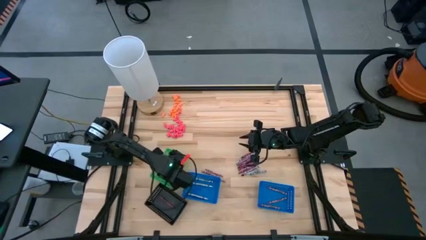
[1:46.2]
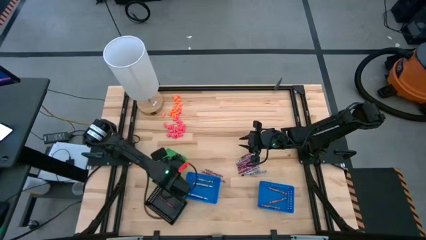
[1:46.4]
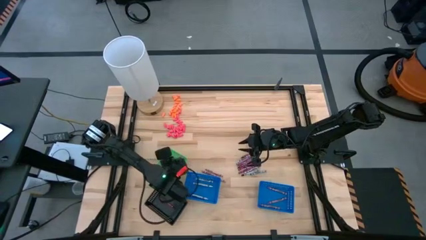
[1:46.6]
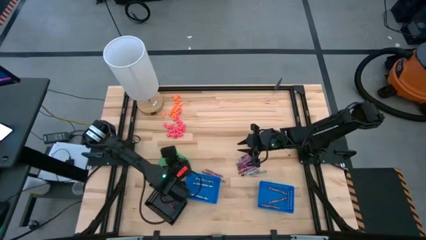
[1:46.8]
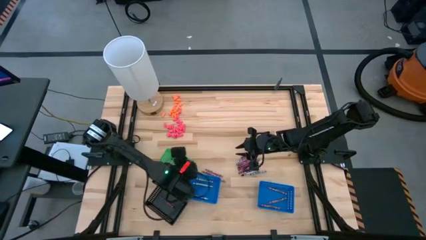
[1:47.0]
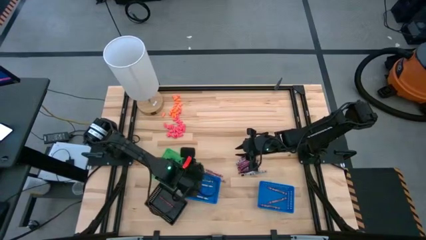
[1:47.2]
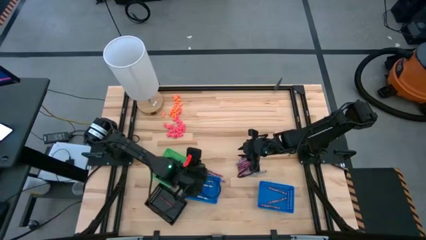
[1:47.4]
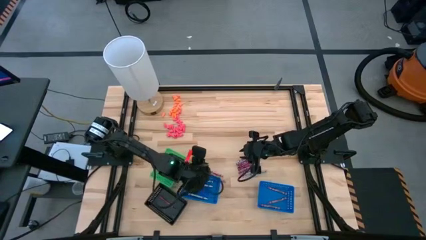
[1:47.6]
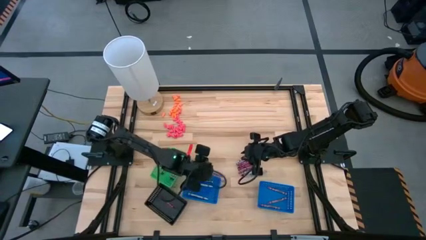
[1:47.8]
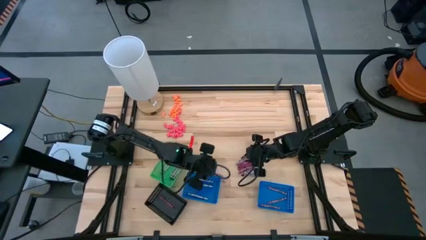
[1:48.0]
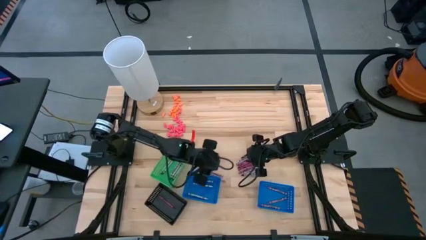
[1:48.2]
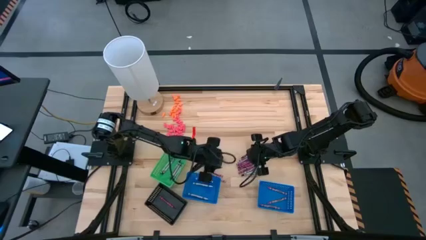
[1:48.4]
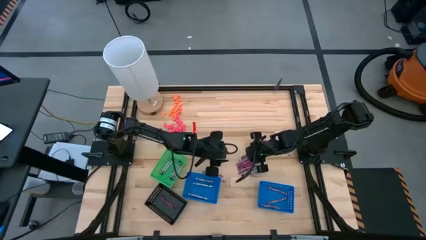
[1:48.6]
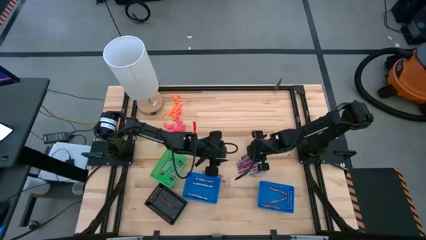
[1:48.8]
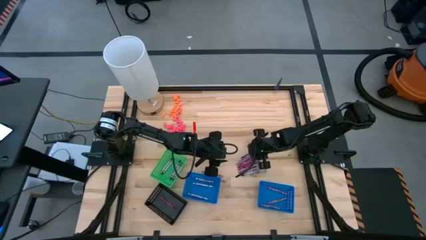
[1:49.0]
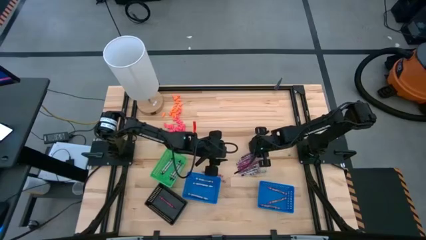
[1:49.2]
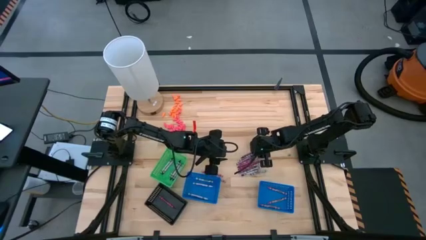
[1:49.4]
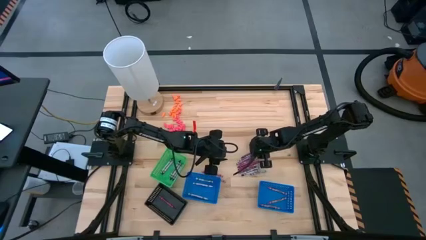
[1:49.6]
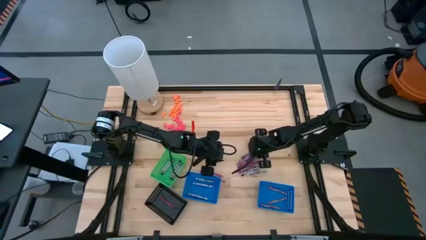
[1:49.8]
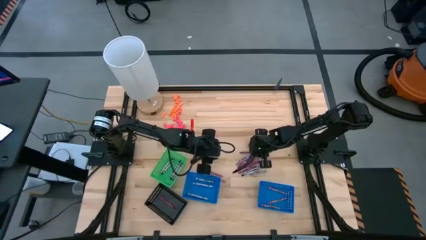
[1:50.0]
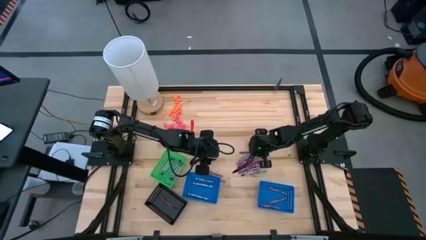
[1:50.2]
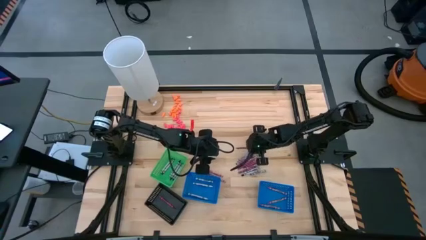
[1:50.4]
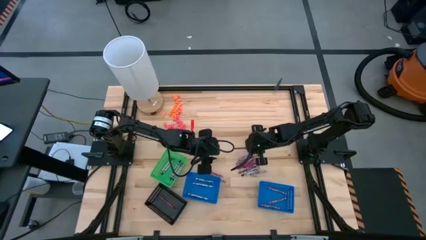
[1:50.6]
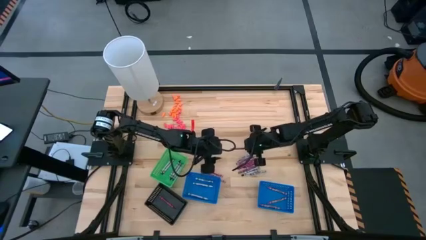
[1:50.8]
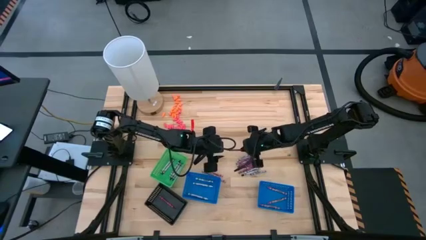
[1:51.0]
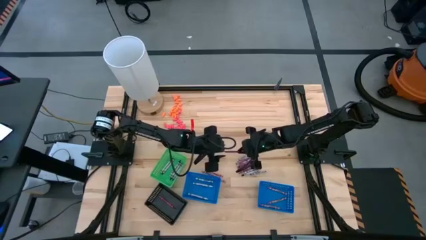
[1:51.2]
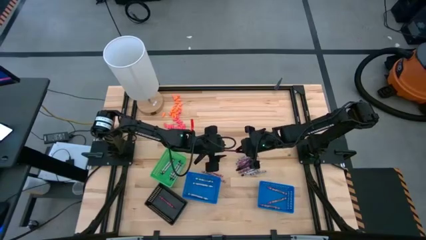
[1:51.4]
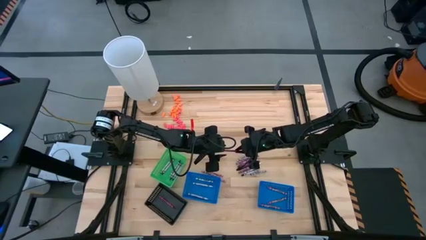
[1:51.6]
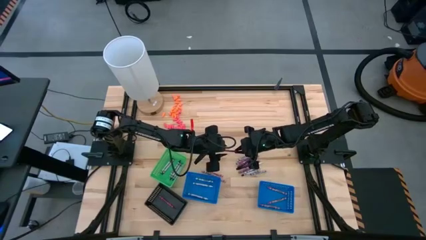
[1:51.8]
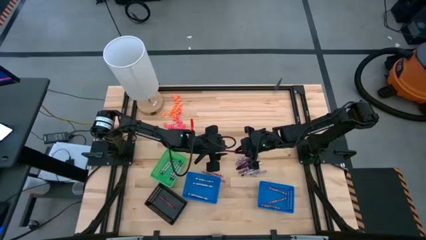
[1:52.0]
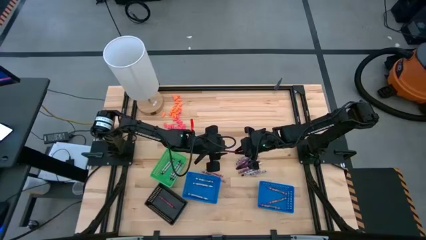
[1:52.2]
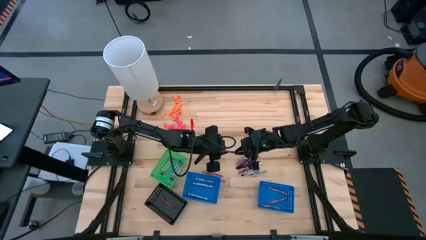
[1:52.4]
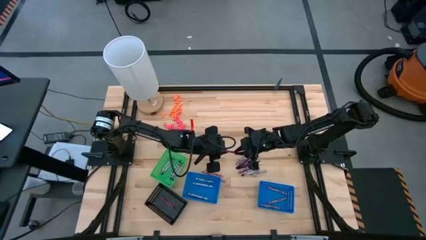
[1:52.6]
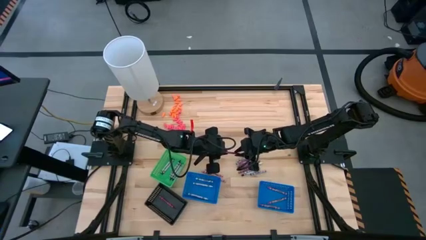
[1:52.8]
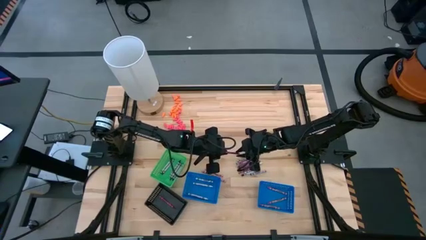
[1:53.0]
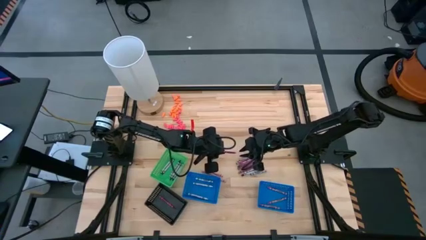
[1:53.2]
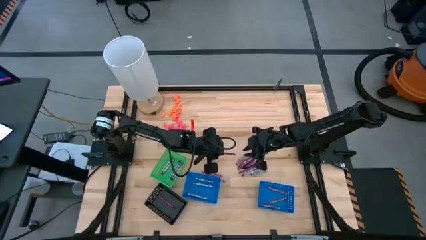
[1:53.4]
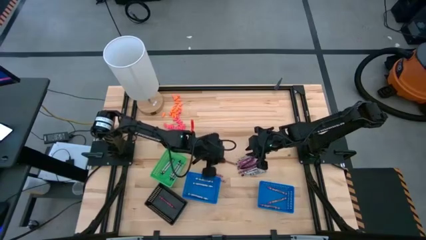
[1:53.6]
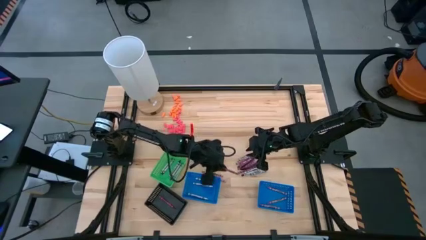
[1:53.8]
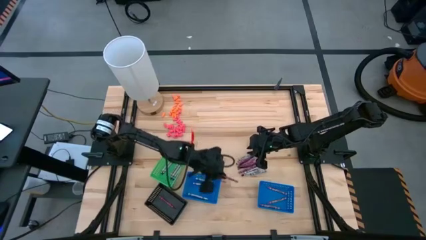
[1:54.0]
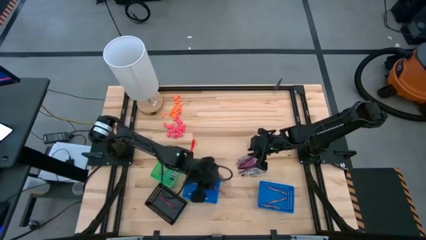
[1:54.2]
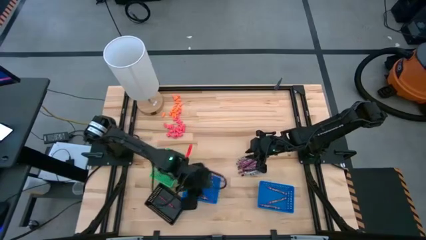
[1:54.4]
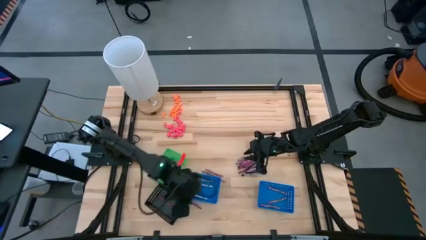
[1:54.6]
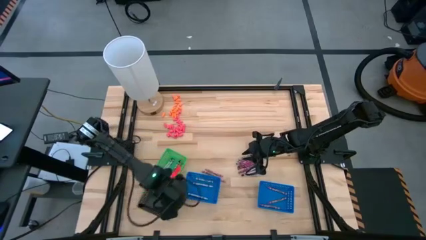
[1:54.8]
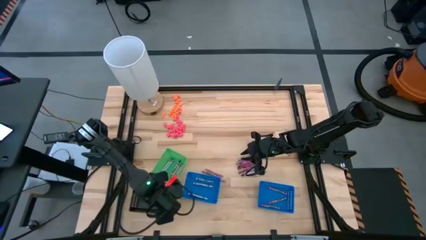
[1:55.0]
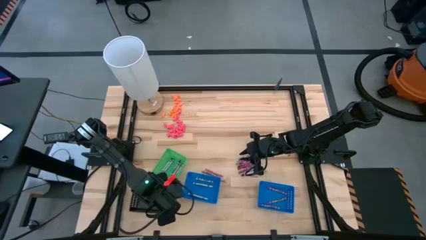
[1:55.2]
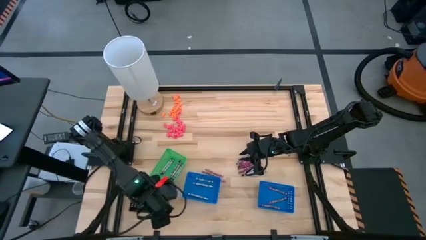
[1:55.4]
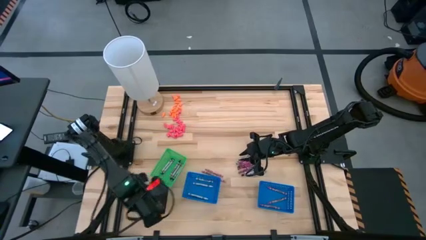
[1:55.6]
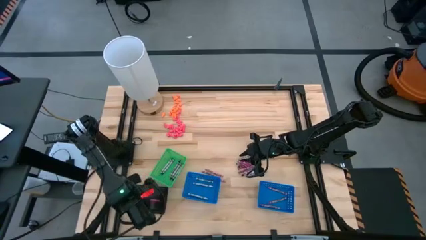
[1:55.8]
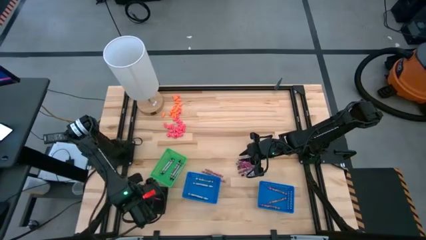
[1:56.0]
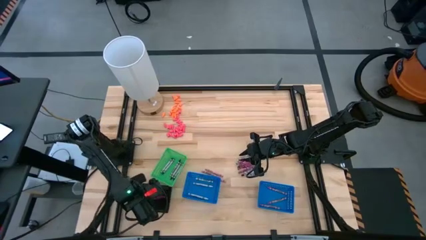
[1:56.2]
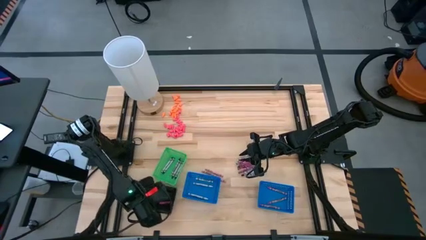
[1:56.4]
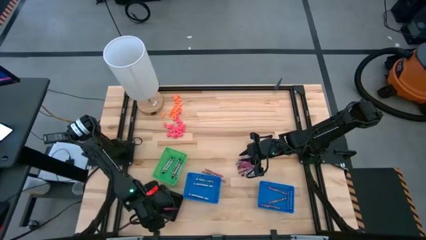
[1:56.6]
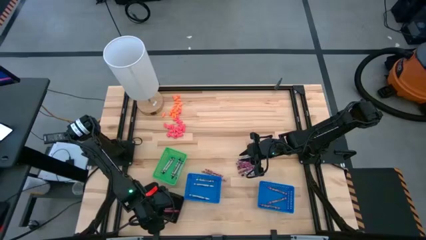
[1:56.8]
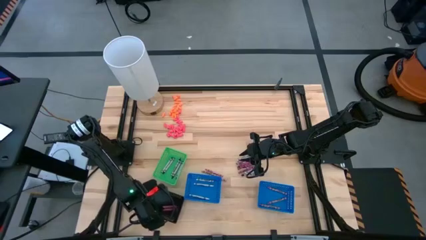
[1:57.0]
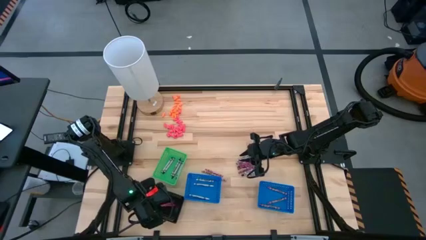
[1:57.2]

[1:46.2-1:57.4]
Task: Sort crayons
Put the red crayon into the black basket

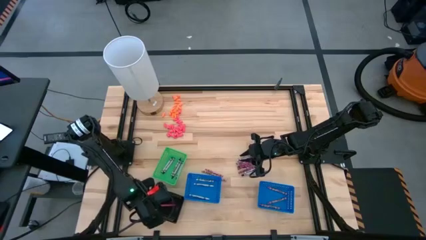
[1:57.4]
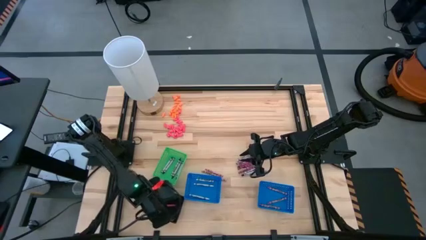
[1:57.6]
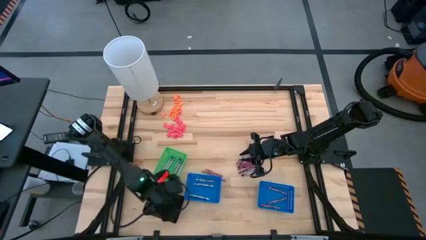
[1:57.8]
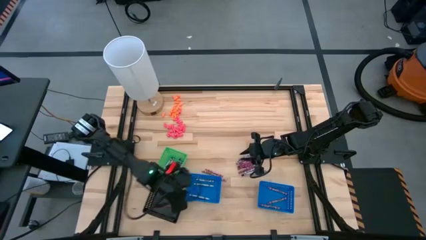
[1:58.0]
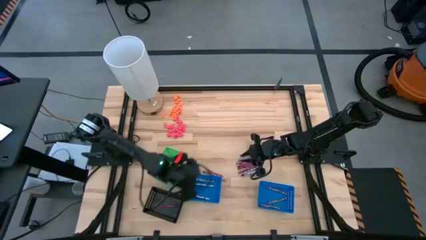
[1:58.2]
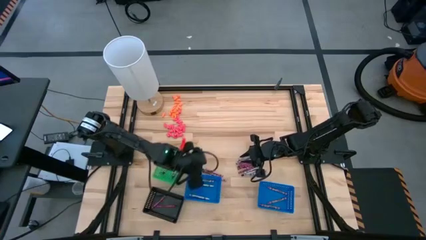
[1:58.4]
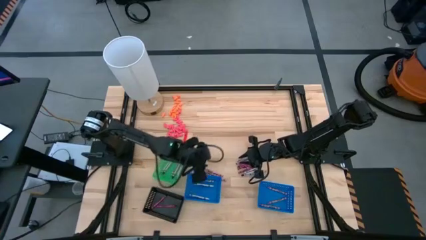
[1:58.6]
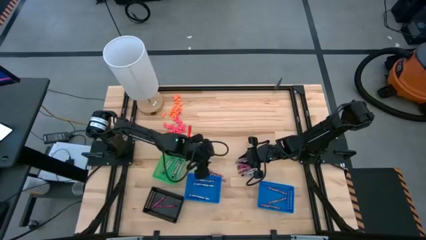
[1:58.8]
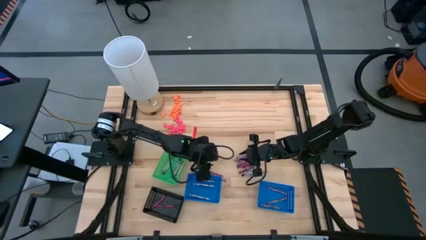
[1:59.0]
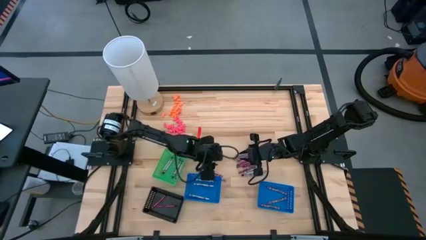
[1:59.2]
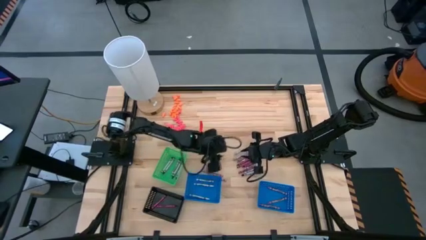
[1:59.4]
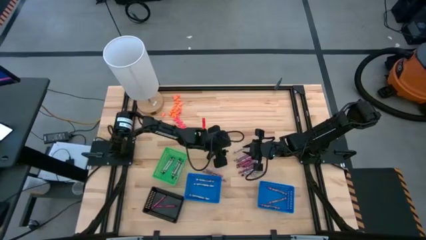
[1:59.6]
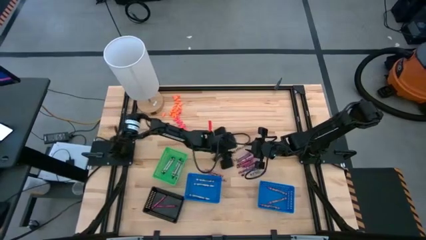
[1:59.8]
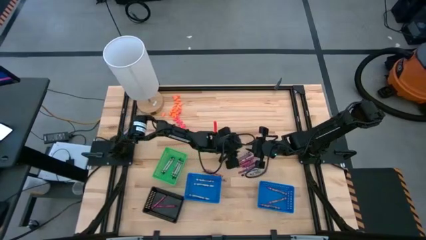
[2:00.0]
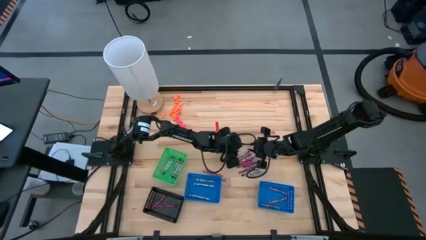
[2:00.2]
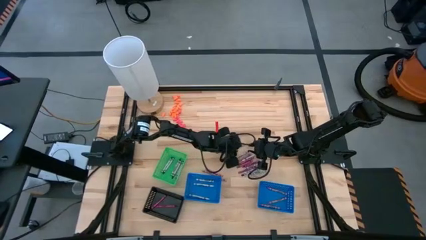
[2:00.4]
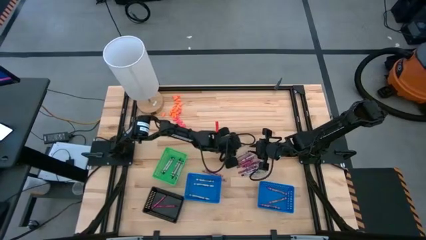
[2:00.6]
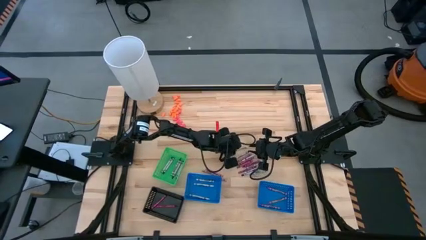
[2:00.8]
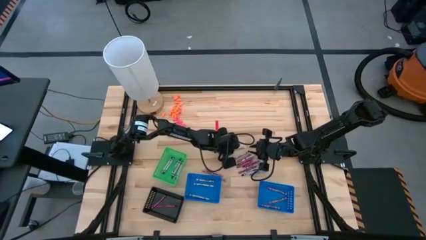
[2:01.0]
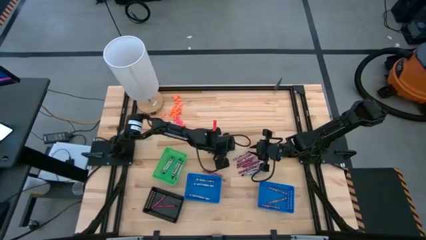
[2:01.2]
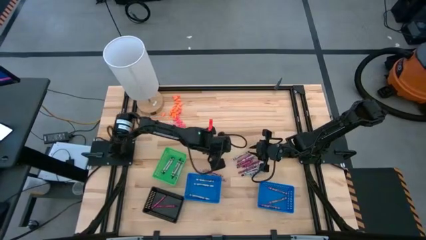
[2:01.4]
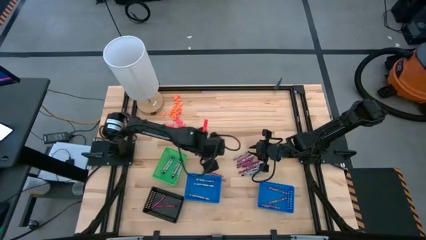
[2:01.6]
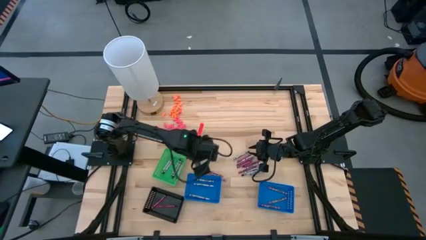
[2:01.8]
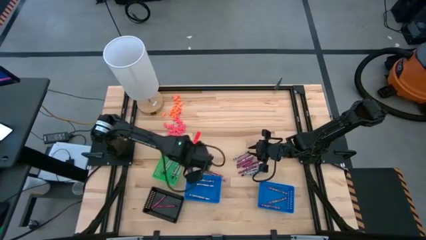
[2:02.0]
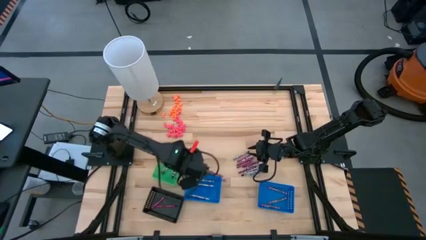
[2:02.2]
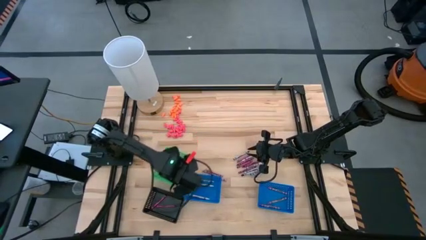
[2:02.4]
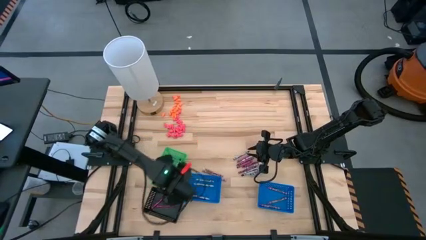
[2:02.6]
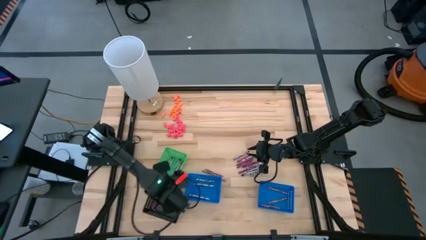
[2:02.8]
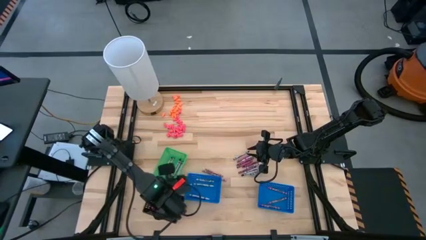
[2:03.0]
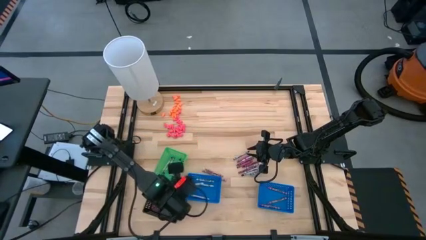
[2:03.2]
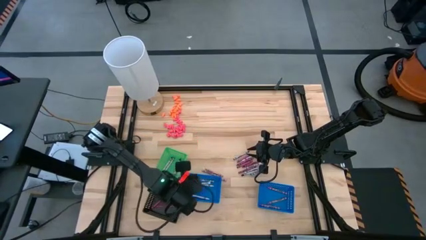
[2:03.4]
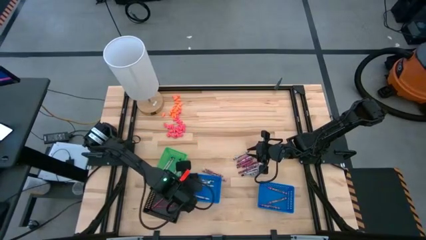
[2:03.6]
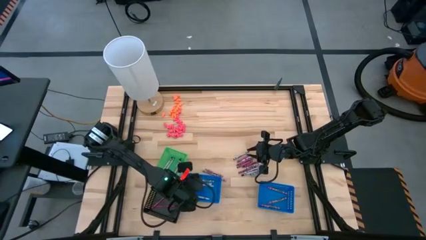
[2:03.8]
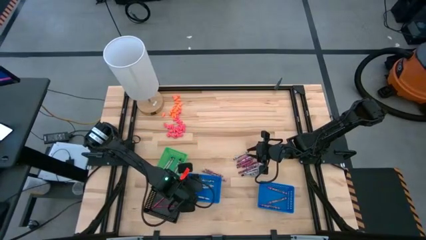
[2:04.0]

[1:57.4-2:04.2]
Put the white crayon into the left blue basket
